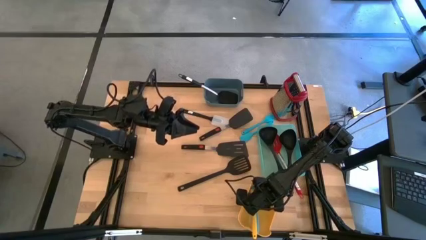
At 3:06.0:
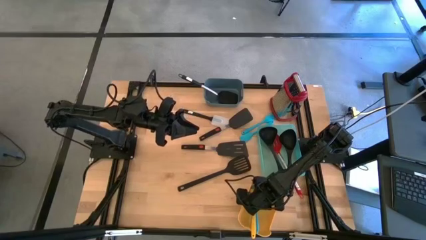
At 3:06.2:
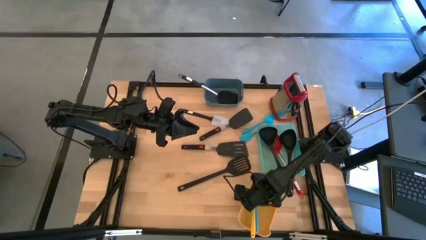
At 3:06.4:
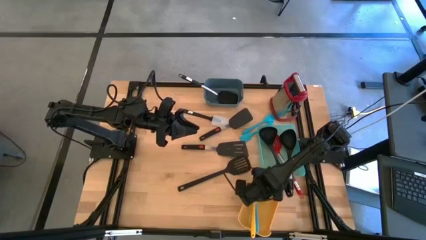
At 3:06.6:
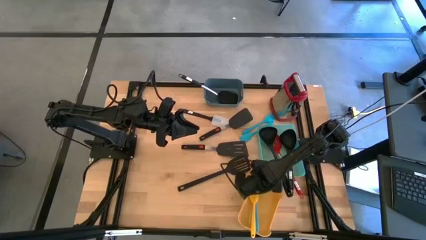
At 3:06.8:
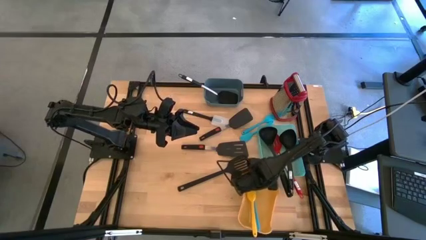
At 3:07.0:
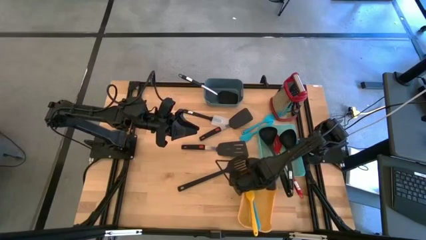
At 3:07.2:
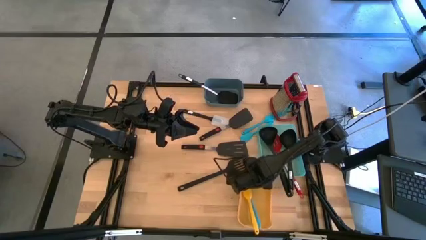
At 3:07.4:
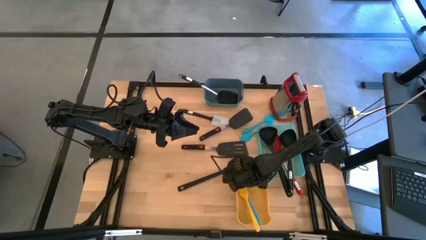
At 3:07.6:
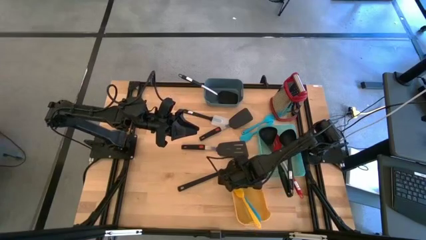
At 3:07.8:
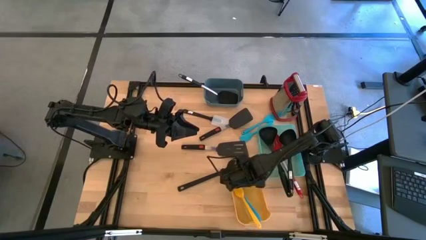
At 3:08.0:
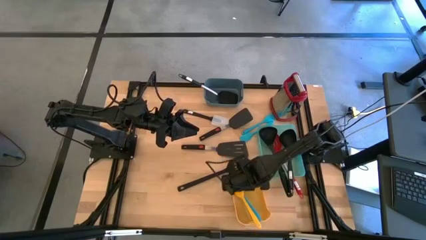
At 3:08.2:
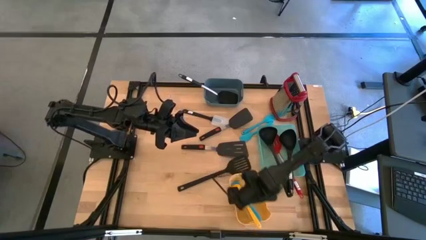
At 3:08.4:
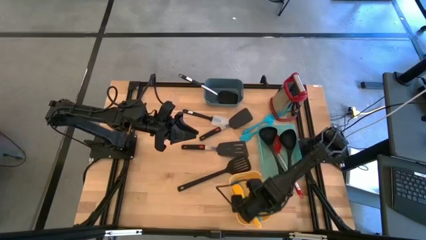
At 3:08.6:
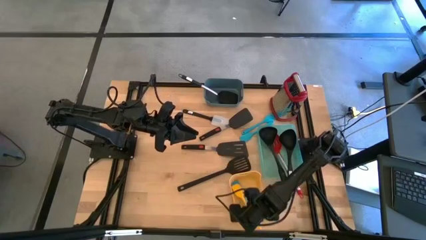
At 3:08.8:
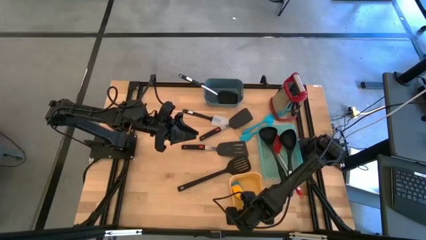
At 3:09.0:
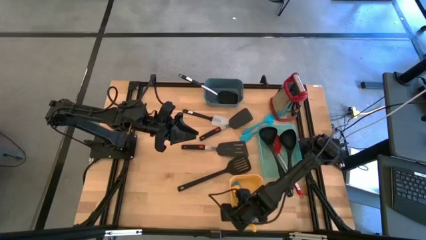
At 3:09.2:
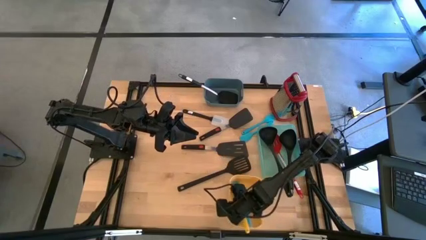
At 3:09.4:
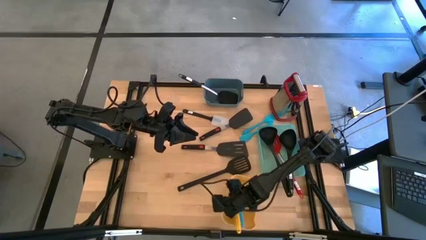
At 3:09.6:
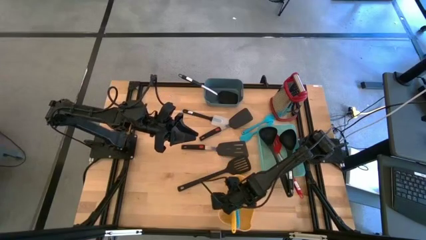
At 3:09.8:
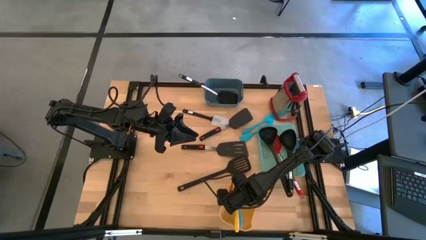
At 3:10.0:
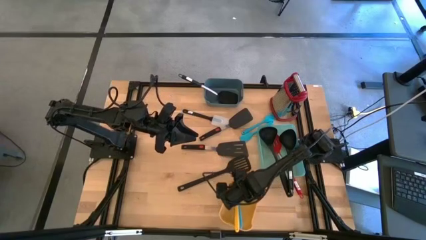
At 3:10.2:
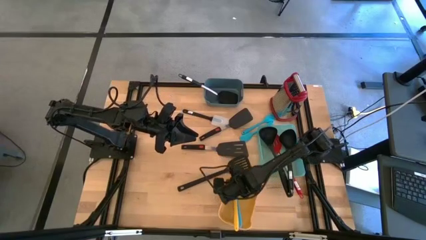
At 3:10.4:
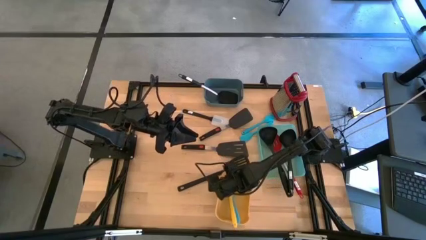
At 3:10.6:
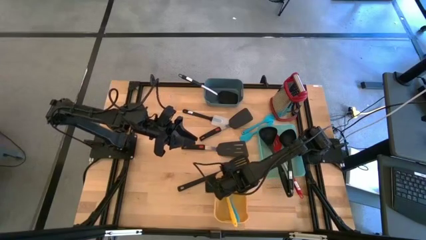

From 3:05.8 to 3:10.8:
Task: Pick & Place Kitchen Items
Adjust the yellow bin

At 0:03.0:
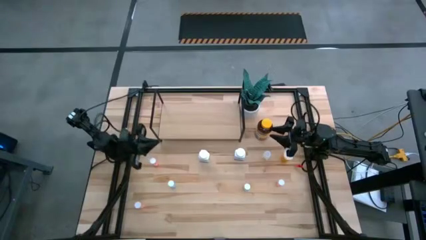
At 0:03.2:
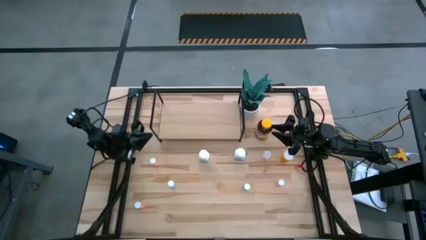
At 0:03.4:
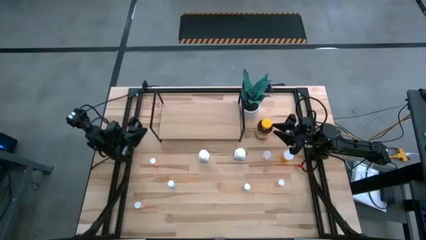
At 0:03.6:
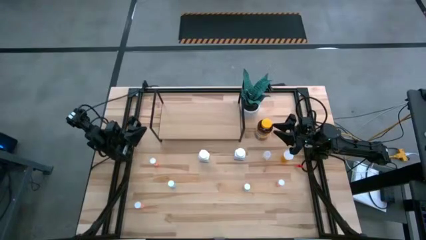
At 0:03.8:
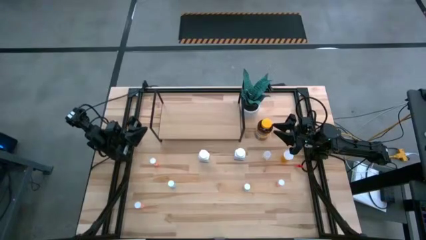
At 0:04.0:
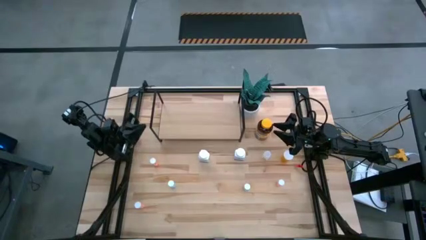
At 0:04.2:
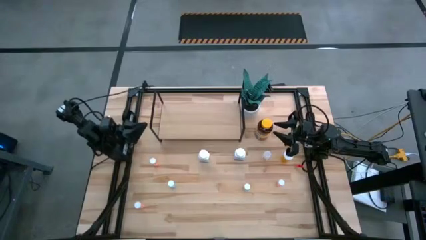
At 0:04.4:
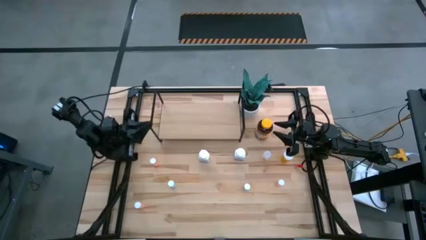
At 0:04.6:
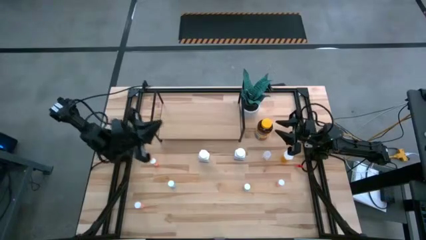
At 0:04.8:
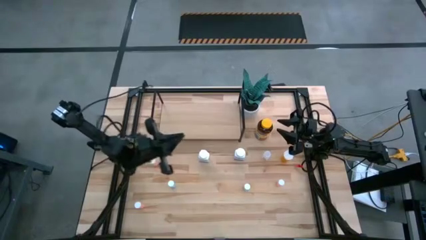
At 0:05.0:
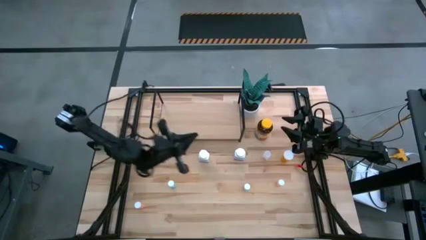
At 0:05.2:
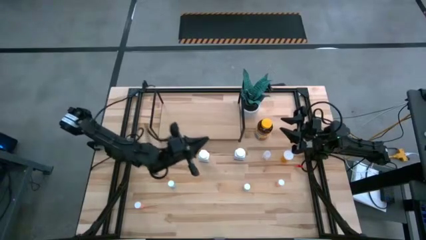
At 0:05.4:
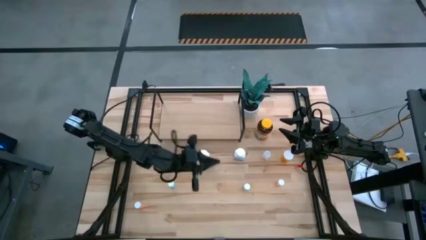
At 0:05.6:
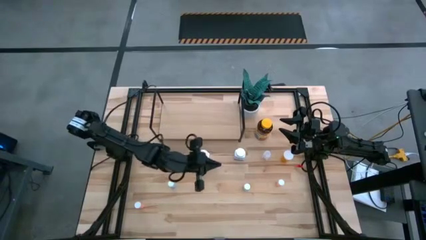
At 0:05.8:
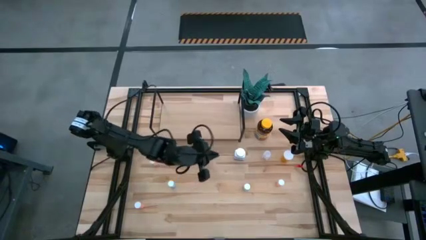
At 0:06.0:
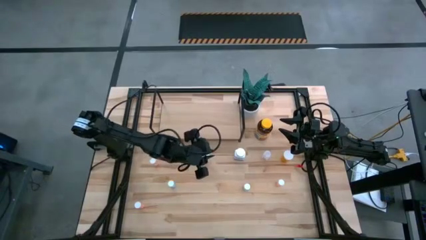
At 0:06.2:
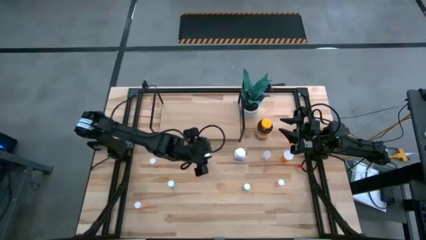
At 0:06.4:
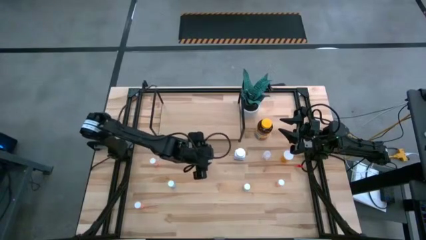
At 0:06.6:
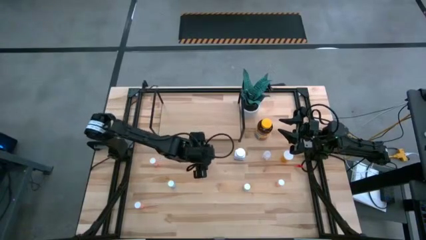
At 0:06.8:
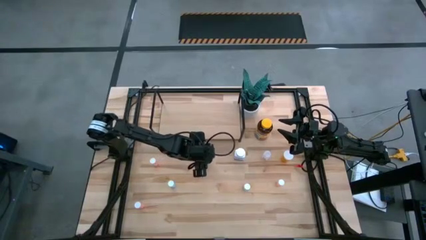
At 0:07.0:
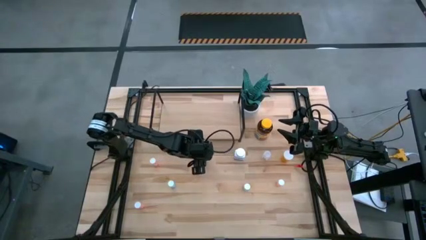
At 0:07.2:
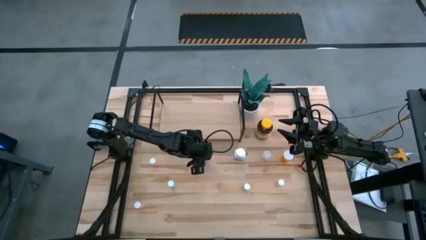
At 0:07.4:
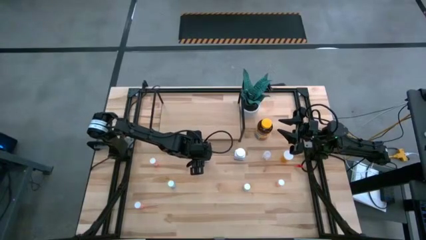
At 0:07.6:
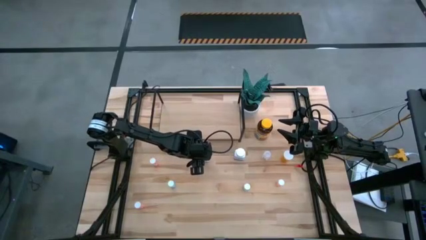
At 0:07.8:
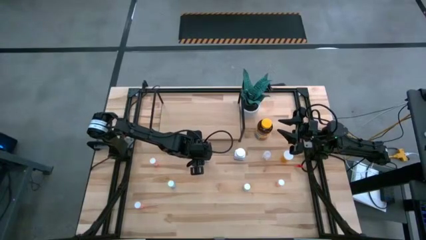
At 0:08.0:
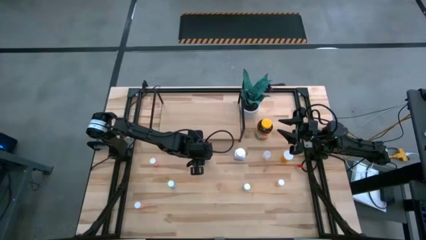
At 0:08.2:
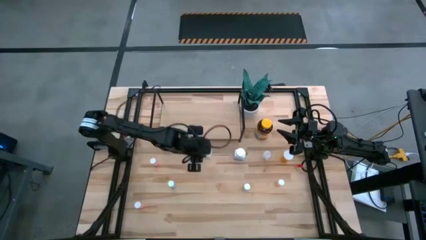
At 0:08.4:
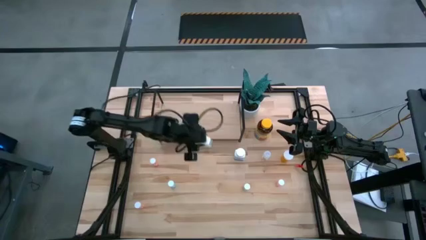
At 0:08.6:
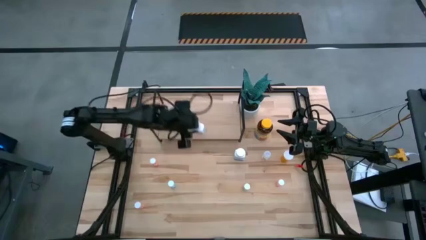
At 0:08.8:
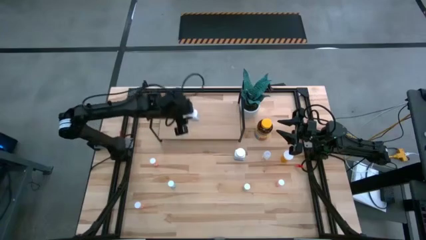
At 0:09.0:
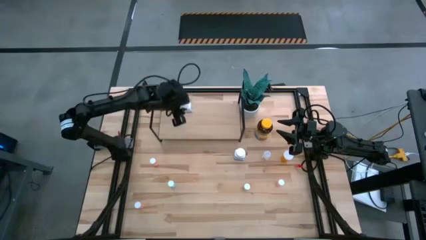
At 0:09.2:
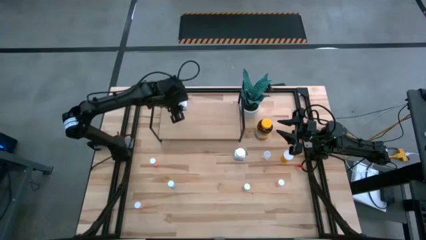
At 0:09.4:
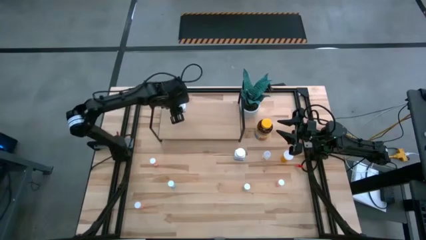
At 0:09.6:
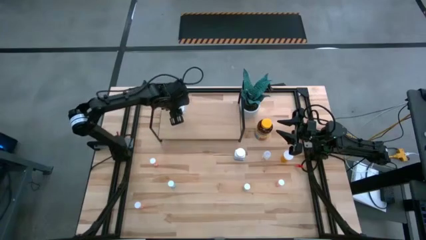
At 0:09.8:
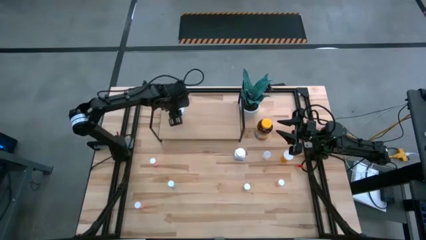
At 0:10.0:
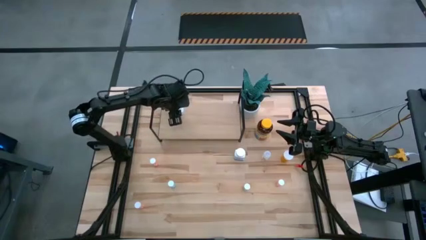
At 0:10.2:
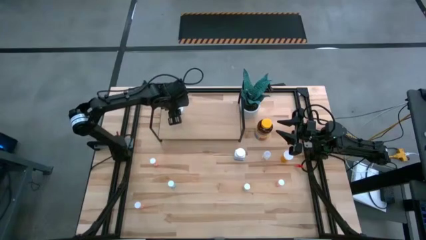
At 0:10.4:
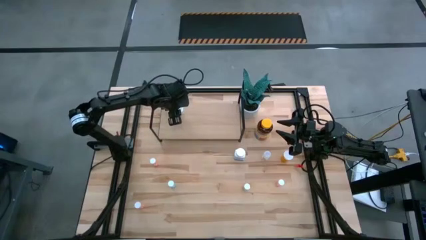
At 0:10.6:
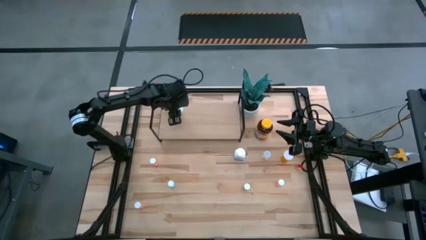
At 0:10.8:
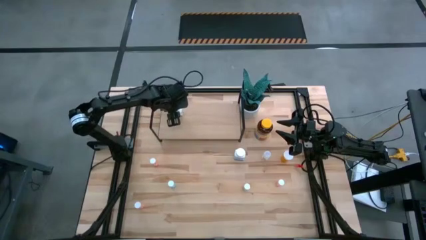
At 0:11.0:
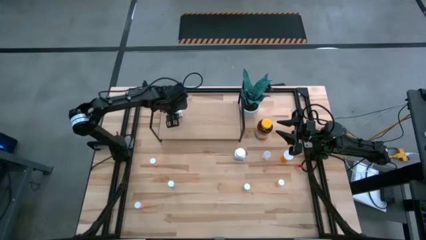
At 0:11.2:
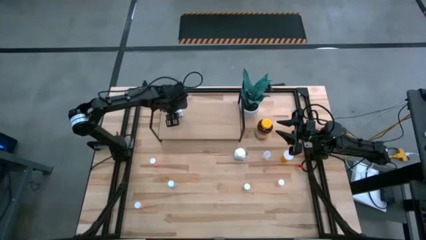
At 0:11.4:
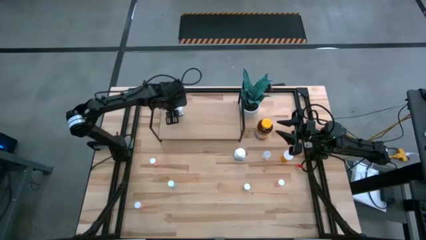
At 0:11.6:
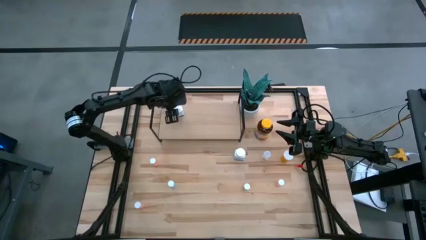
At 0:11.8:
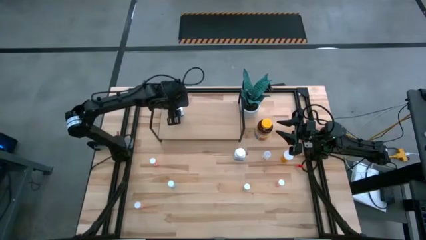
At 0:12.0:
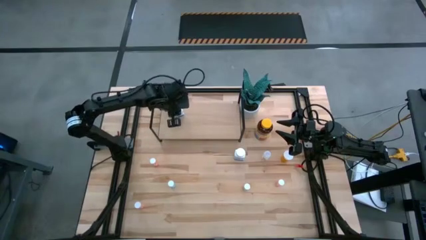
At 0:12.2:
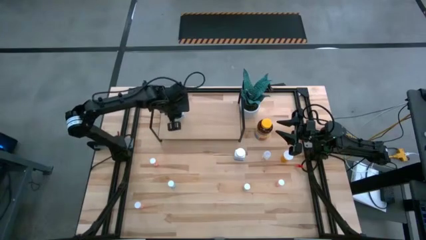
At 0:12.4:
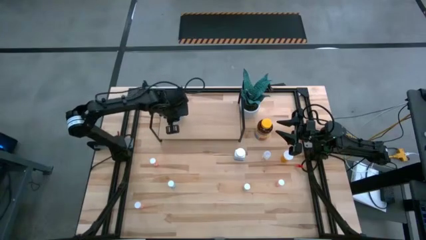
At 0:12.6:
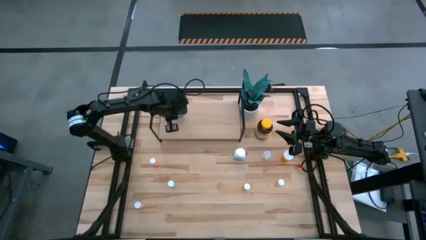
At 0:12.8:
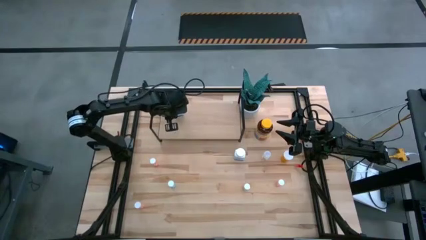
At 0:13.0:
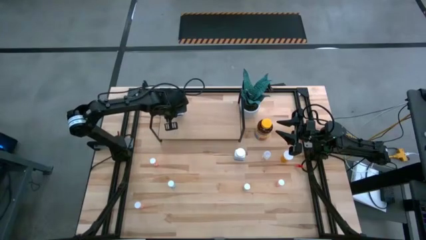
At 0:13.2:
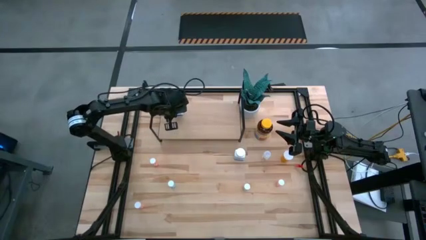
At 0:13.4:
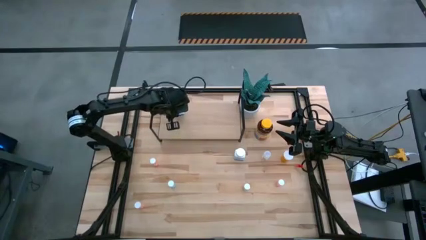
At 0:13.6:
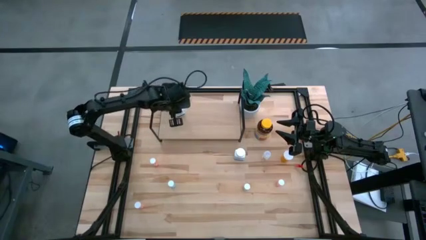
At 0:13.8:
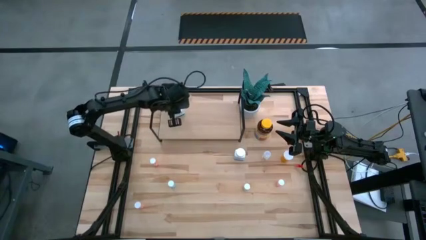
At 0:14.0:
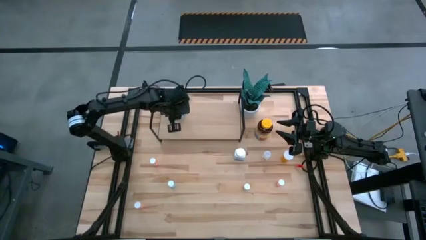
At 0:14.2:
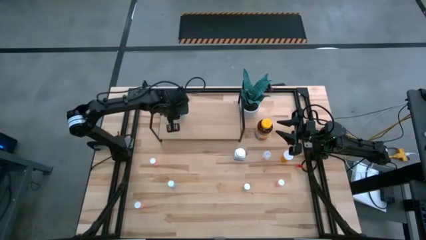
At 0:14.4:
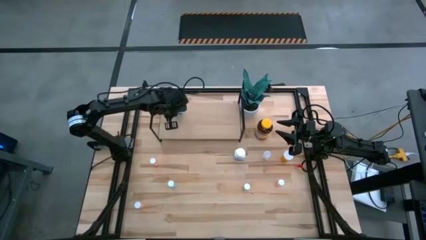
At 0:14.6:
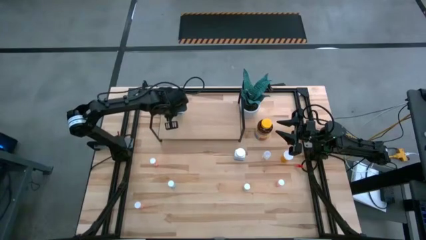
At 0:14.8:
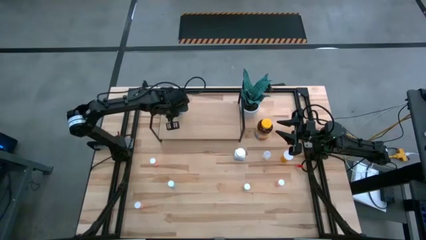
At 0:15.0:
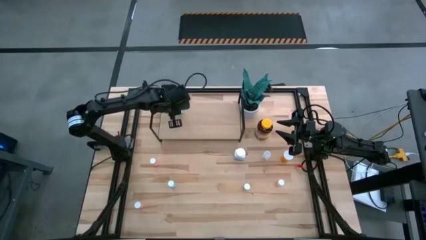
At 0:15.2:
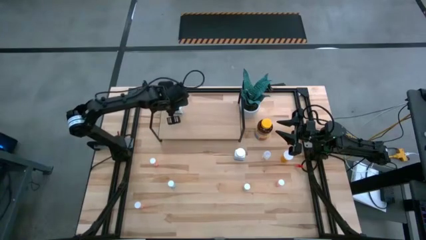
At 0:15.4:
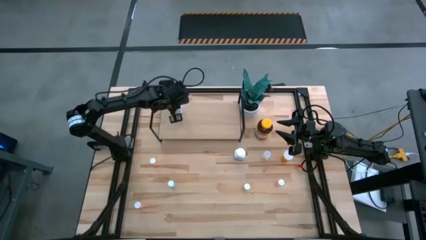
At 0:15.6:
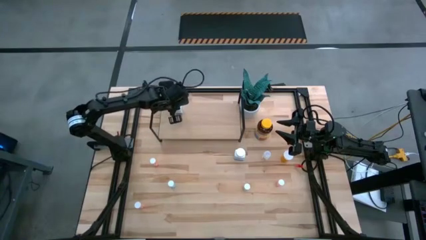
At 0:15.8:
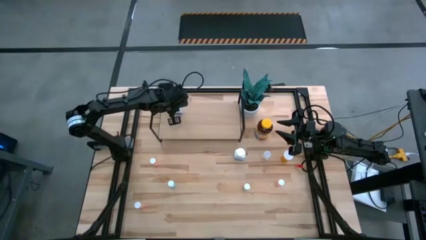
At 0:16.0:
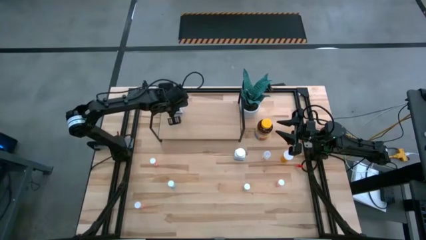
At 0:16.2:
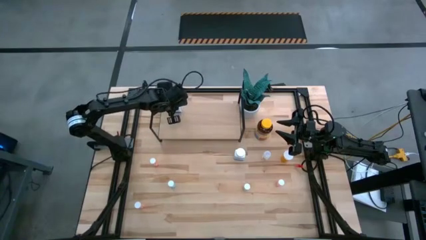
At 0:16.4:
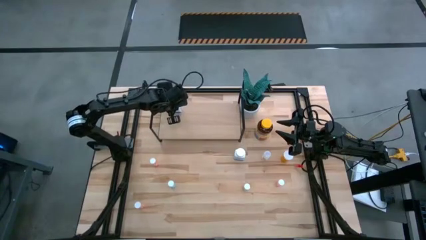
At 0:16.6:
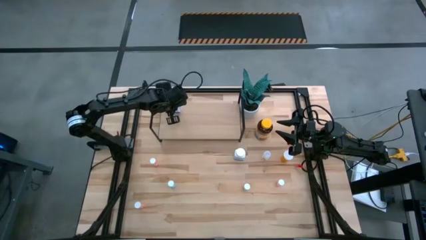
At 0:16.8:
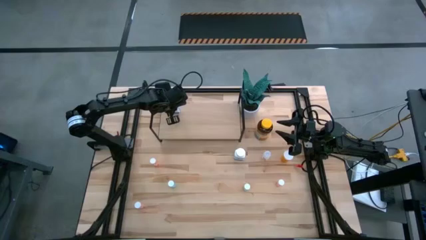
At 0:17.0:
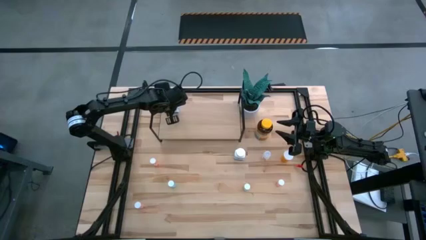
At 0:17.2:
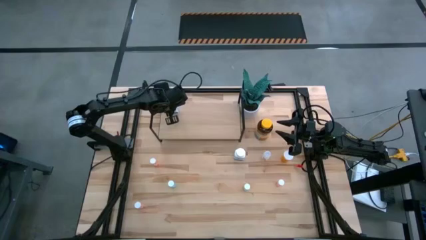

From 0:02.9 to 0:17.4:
Task: Pick and place medicine bottles onto shelf by color
Put the left white medicine bottle on the shelf
